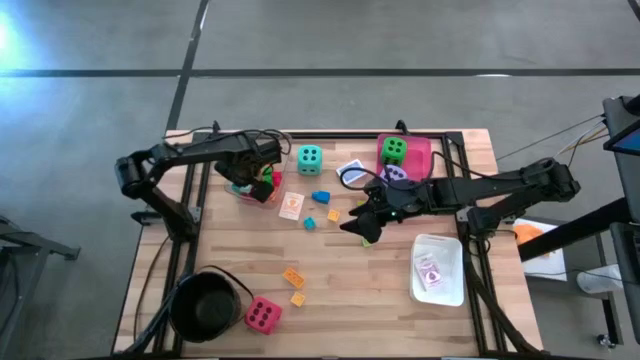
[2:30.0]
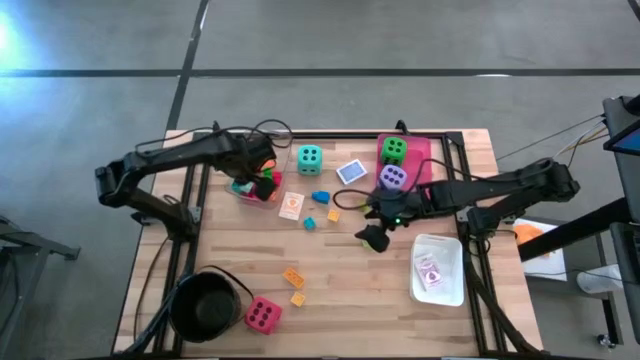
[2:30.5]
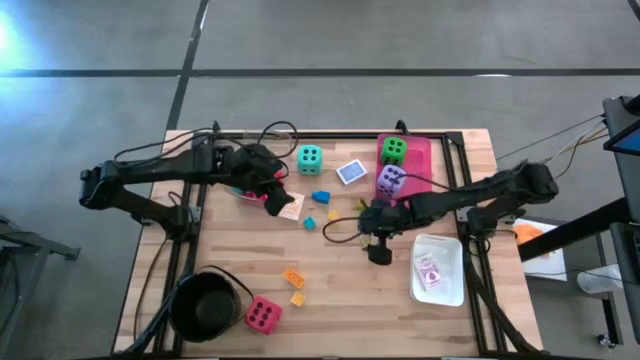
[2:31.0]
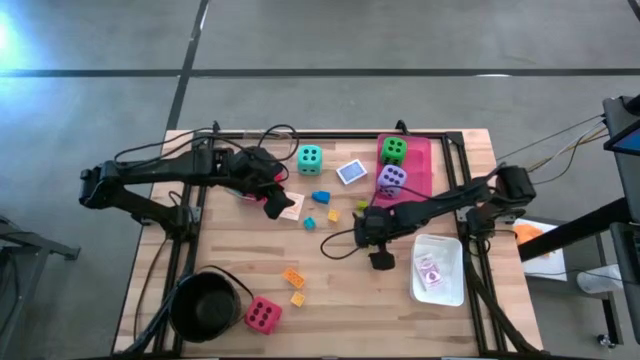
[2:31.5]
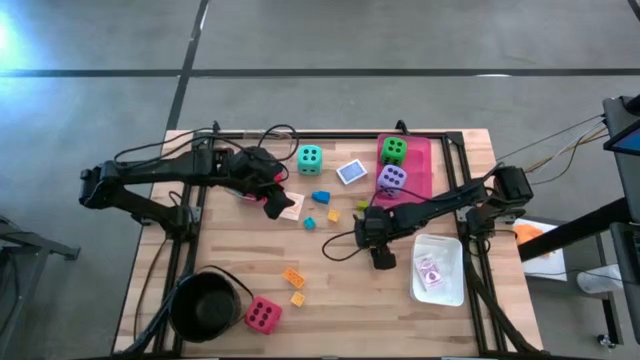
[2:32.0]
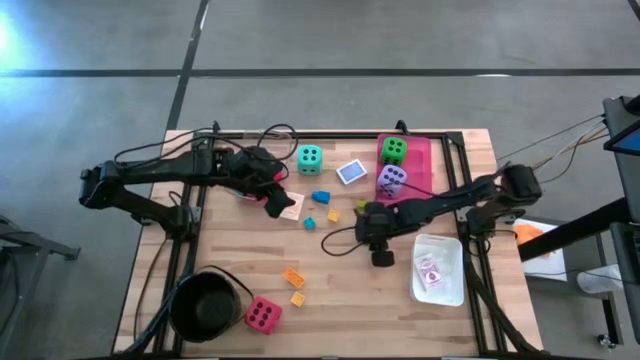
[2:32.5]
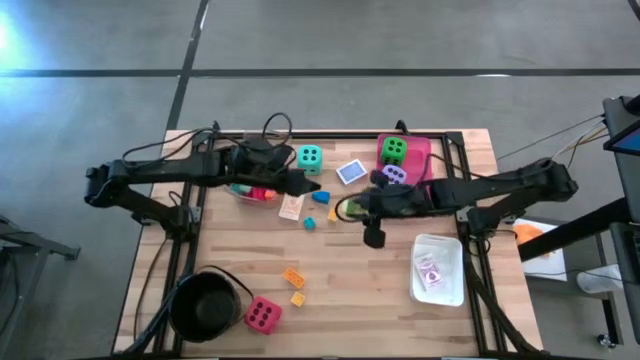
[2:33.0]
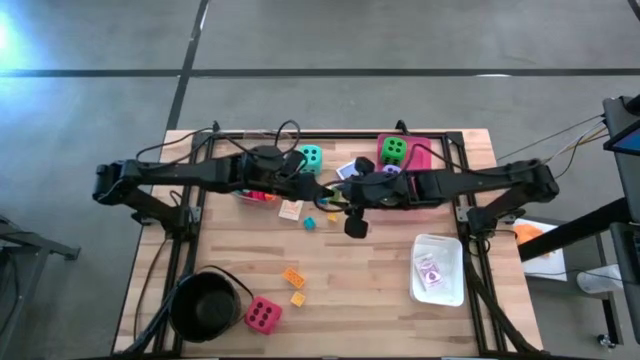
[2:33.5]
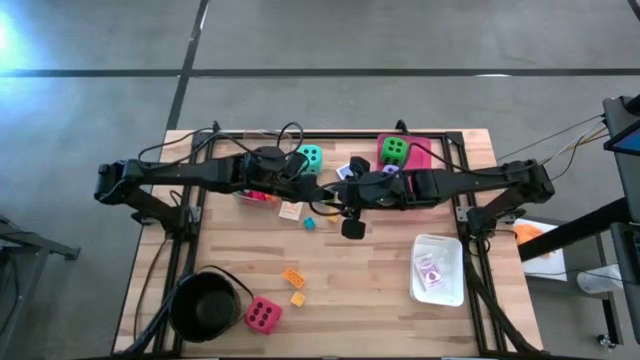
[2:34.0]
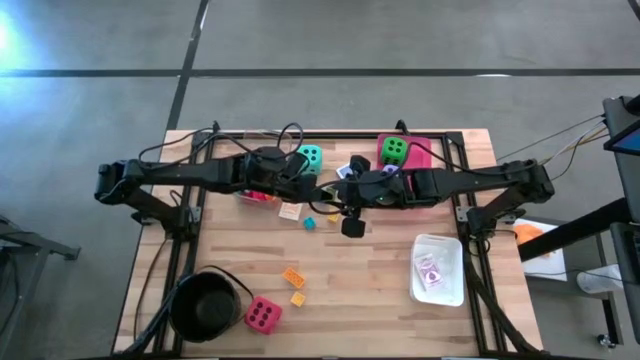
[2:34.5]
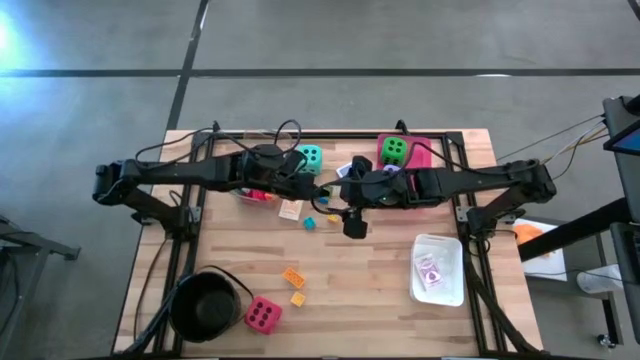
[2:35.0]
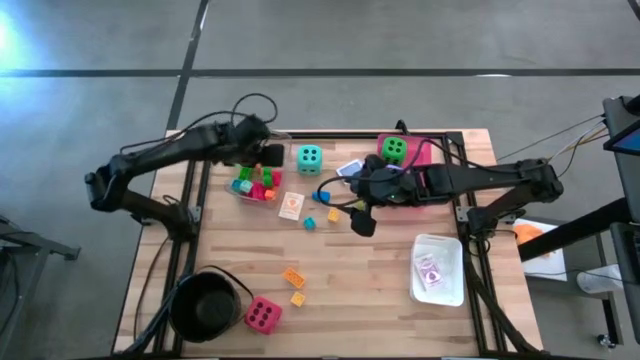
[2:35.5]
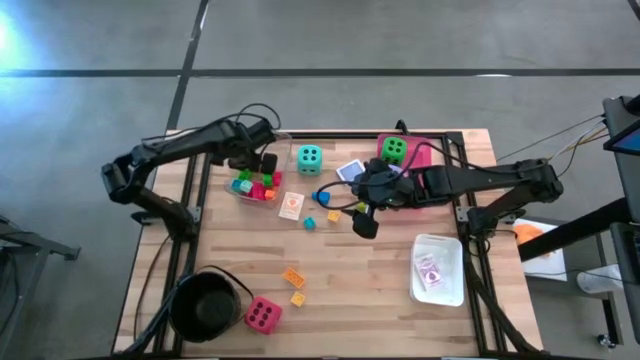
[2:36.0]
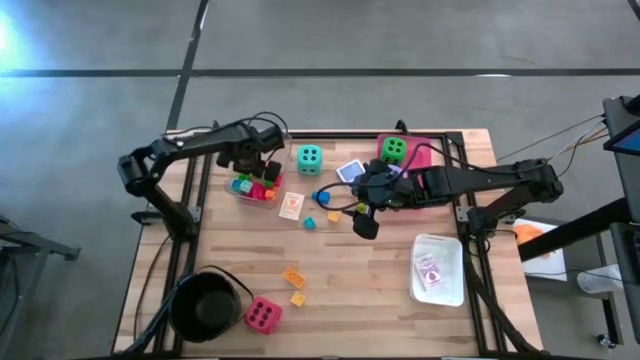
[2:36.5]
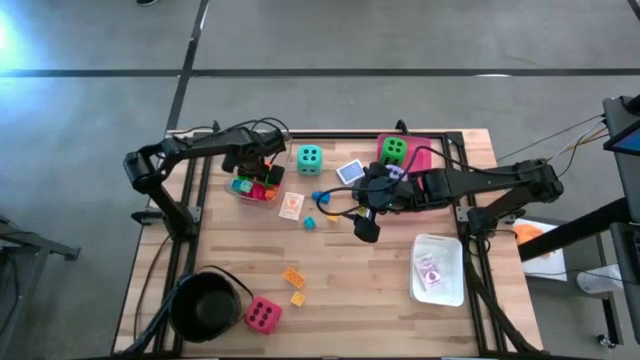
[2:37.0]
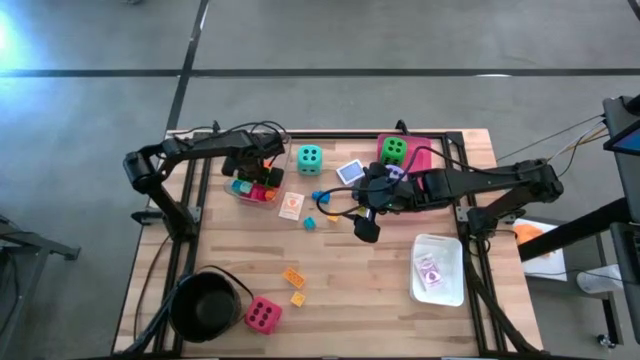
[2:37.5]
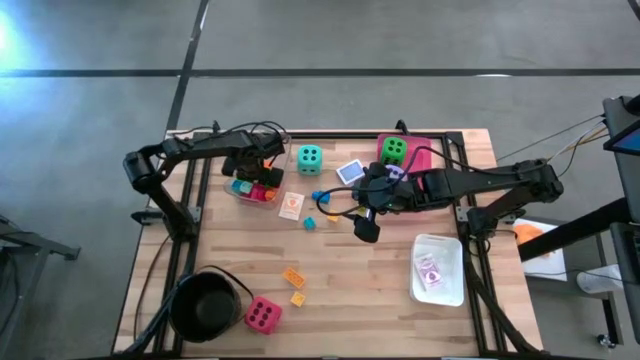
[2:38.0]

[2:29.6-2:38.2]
Task: Pick & Place Toys
Put the light green game piece into the transparent bin

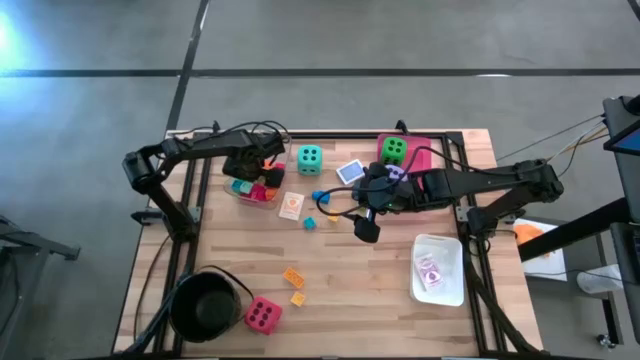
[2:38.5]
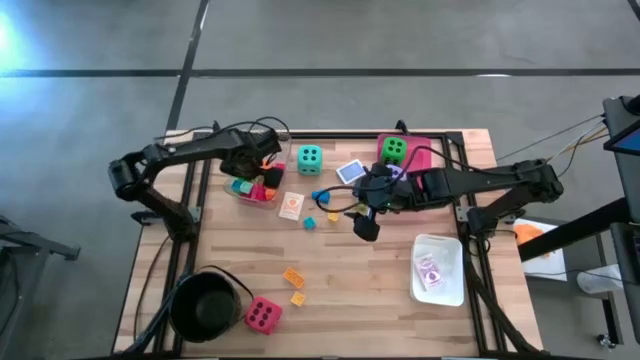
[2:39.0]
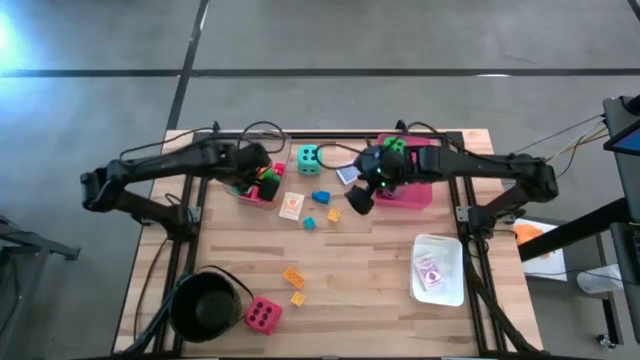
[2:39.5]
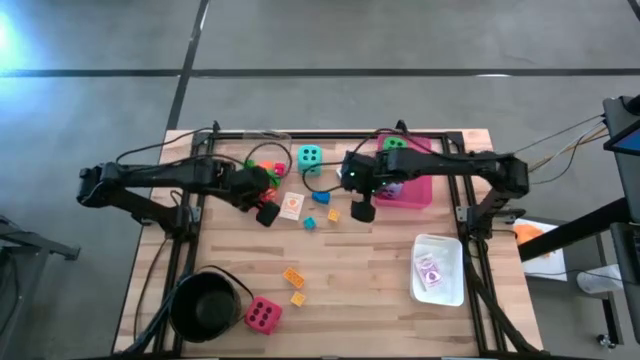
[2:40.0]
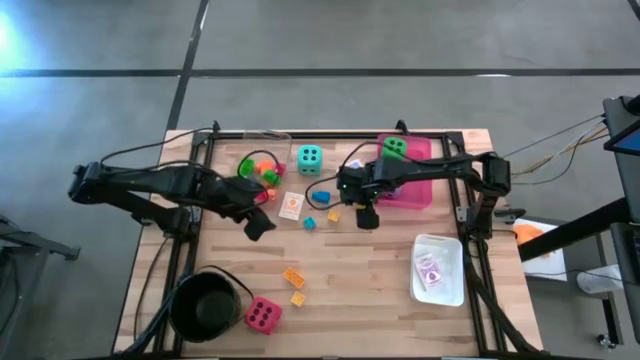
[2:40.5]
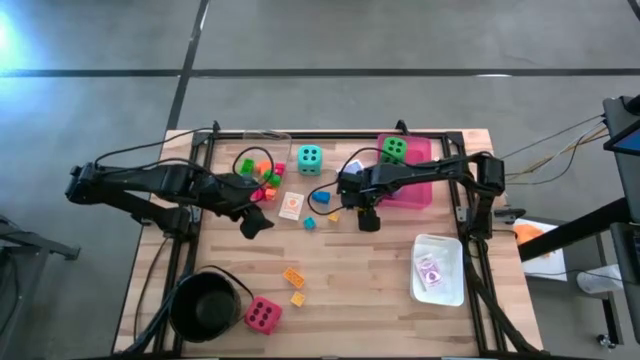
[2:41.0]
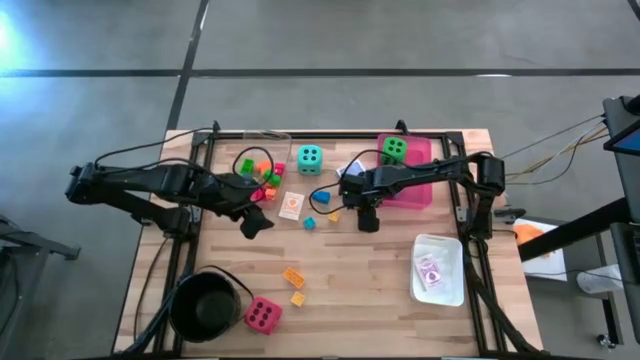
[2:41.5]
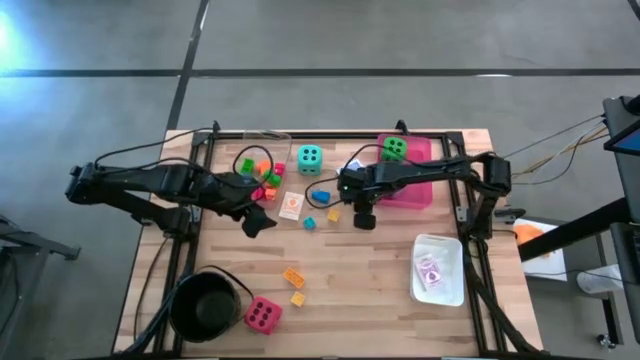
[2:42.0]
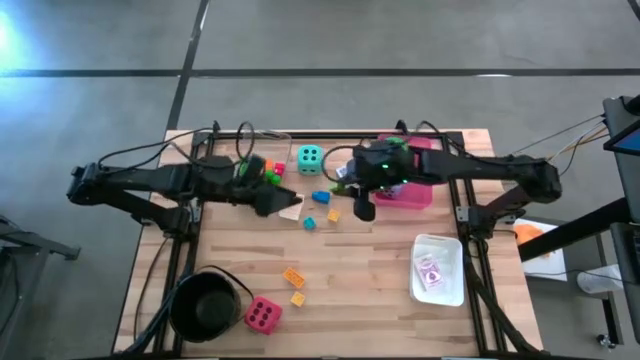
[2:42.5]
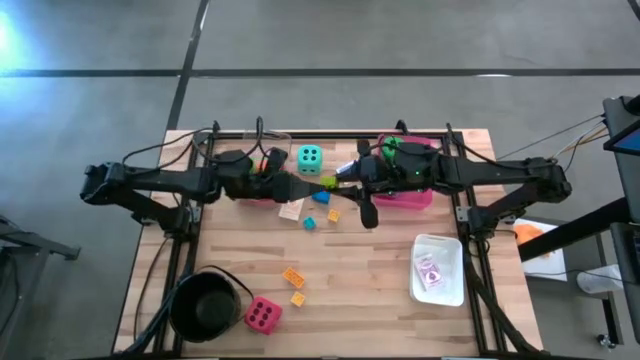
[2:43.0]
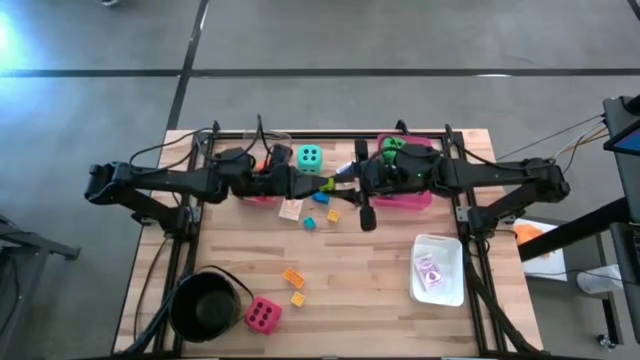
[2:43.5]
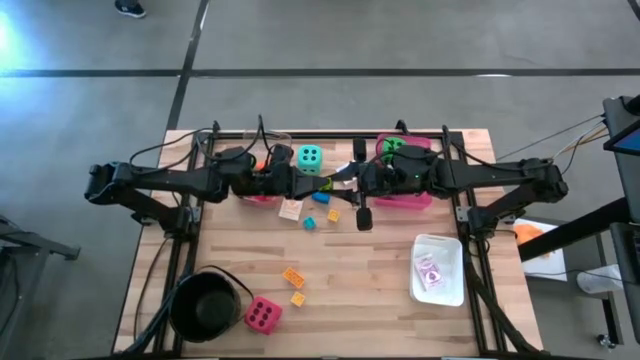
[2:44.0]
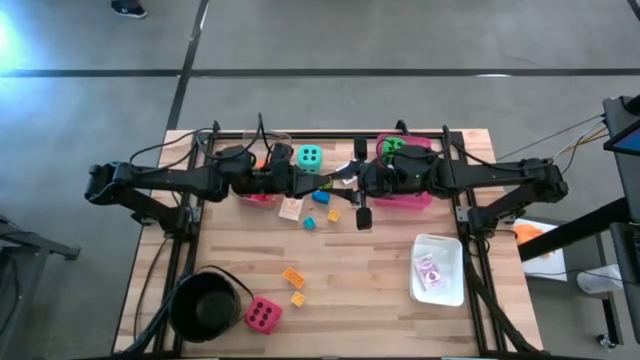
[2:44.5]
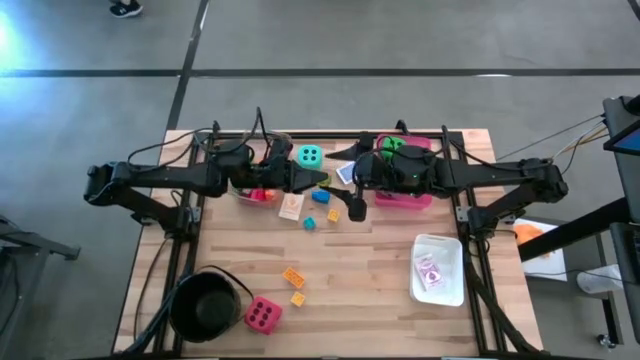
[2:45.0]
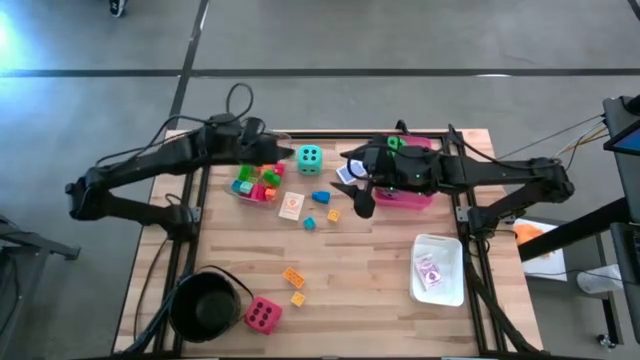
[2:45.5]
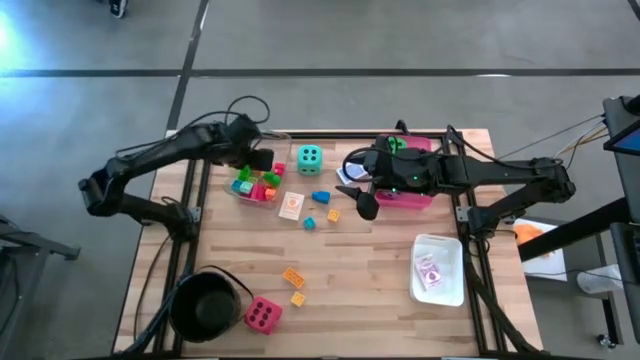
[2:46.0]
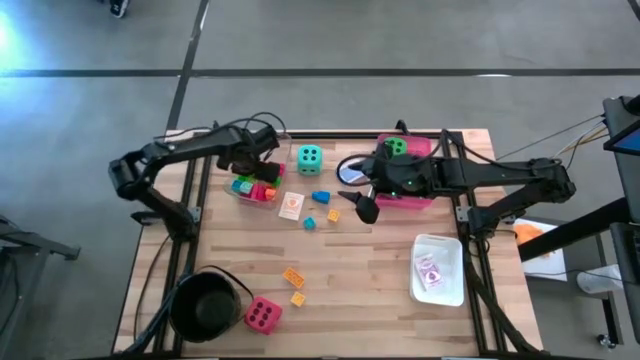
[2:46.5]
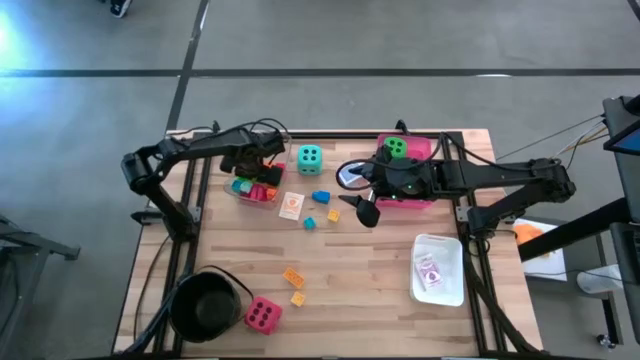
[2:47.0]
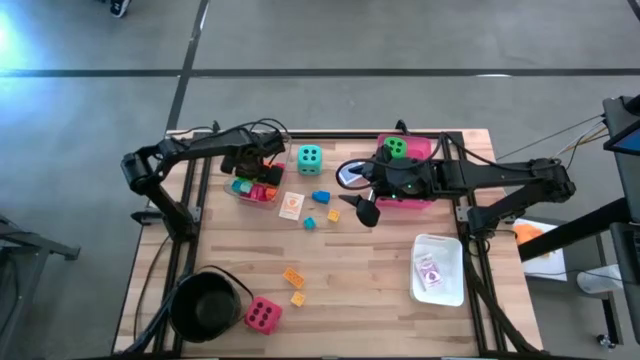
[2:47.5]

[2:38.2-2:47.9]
Put the green game piece into the transparent bin

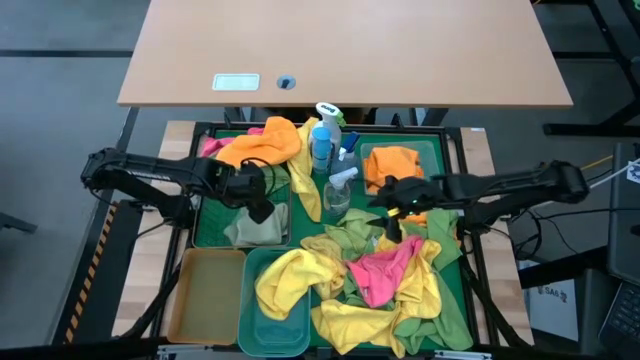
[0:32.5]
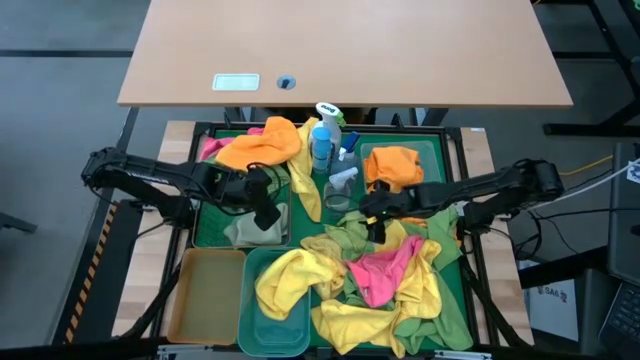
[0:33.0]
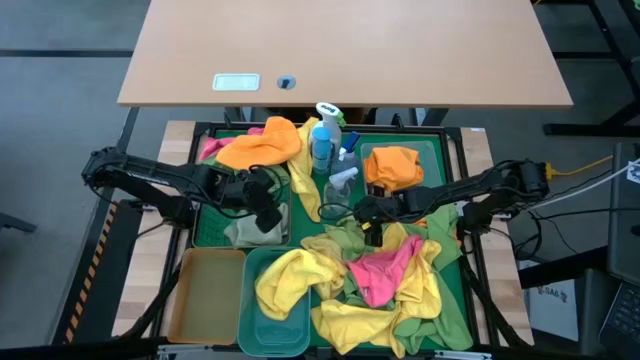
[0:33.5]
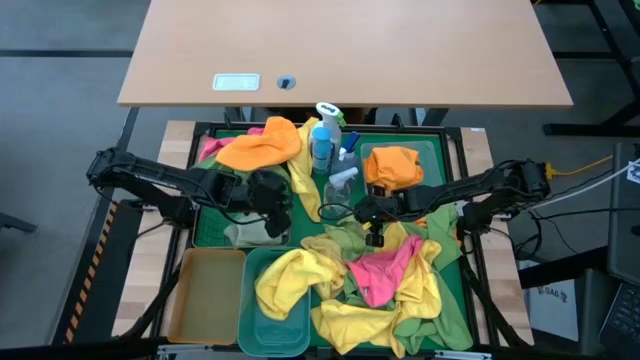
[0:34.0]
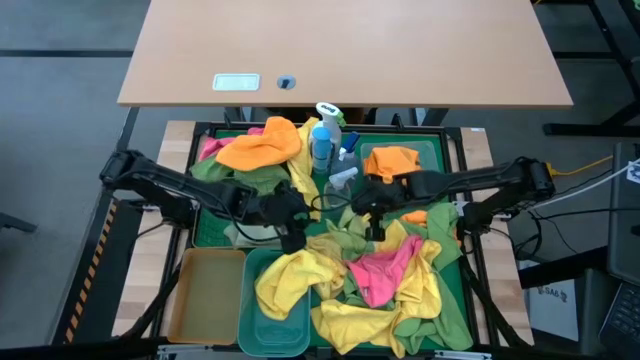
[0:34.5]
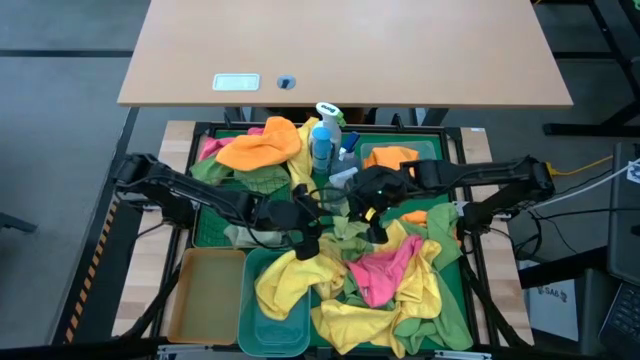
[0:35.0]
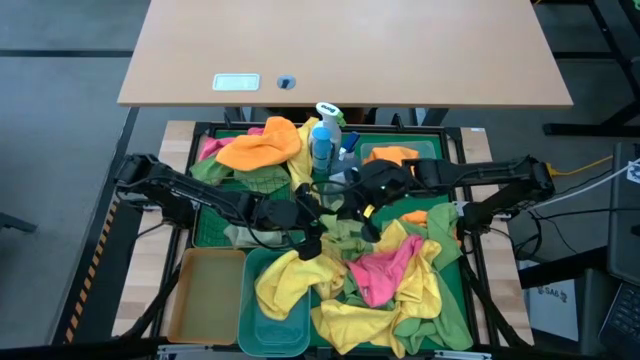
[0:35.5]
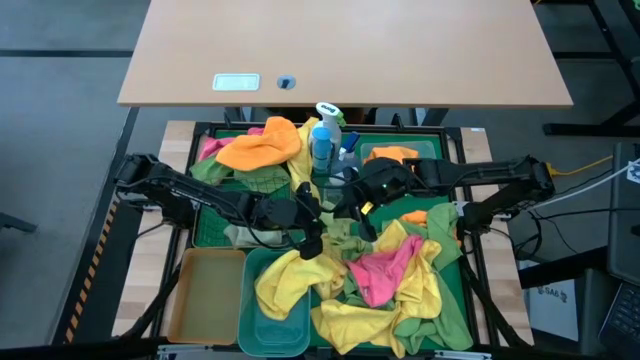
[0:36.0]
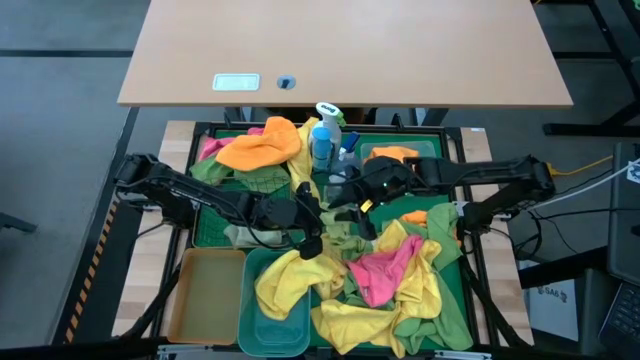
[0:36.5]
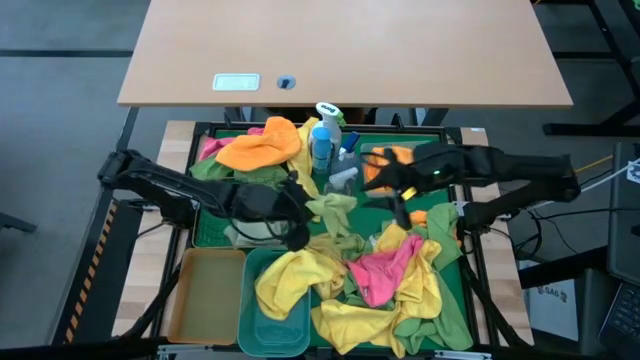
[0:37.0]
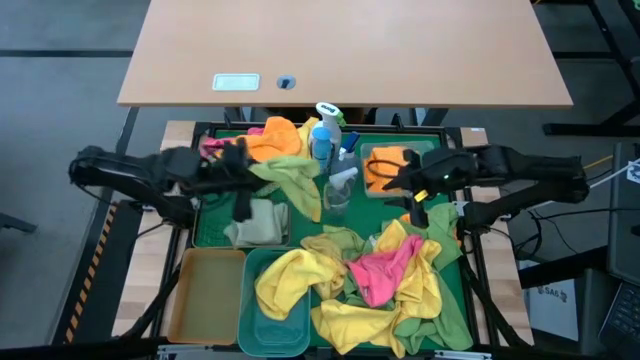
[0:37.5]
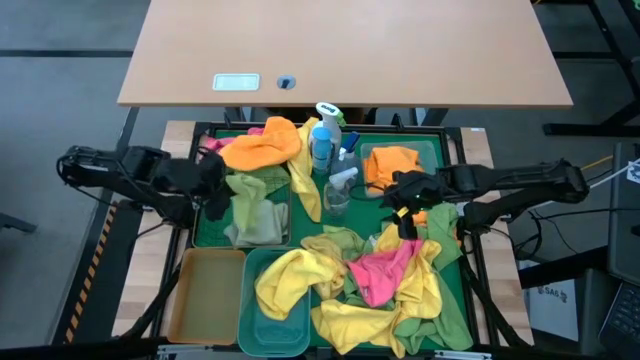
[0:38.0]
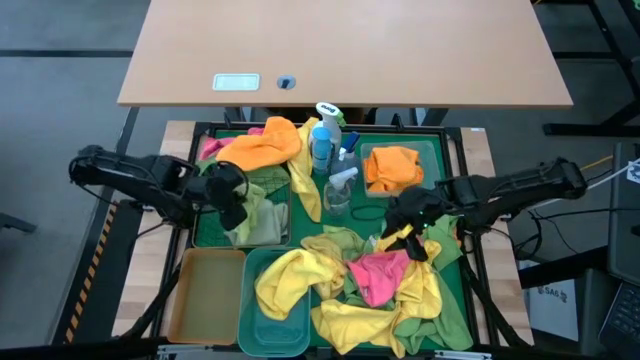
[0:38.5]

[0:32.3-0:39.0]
Task: Sort microfiber towel by color & place in baskets
Put the green towel into the wire basket
